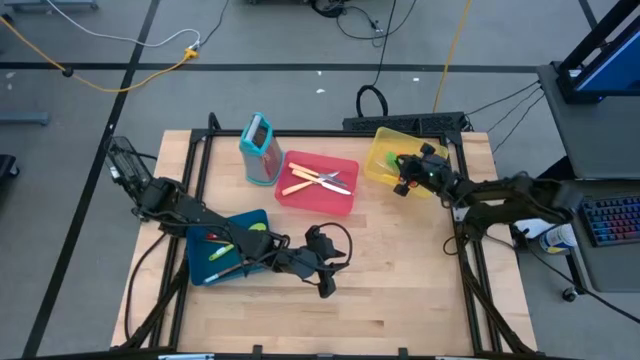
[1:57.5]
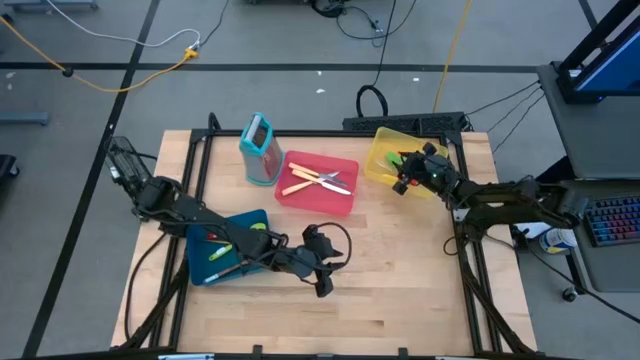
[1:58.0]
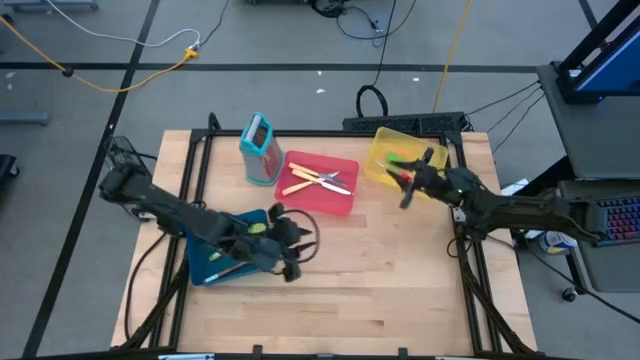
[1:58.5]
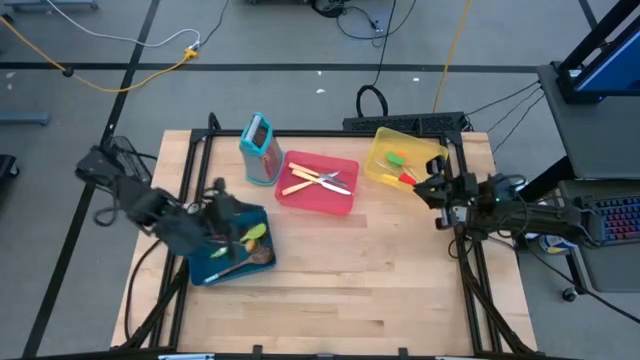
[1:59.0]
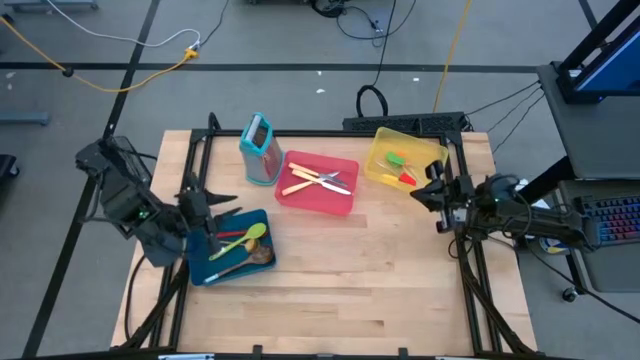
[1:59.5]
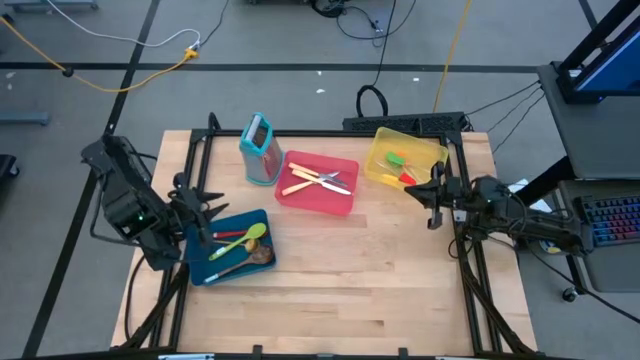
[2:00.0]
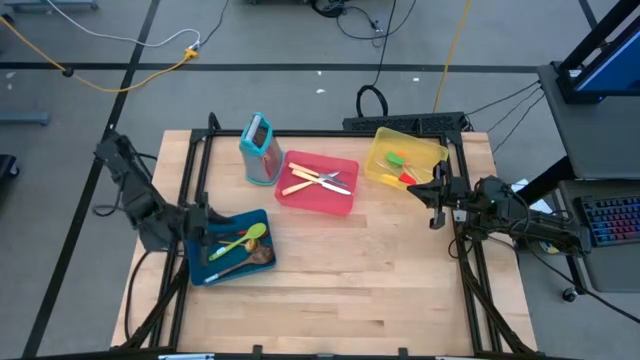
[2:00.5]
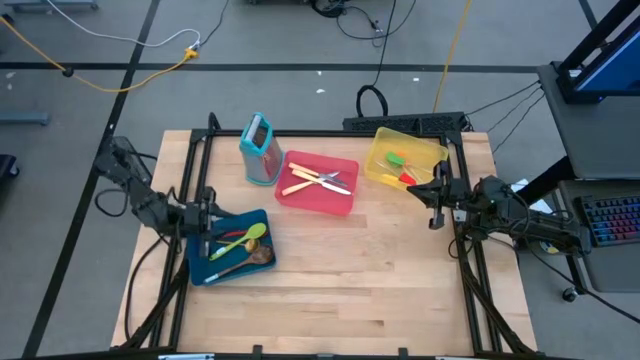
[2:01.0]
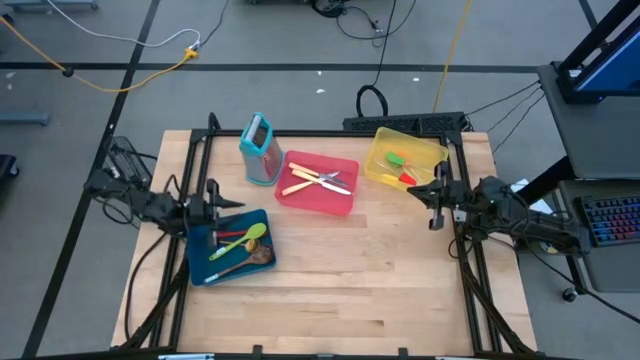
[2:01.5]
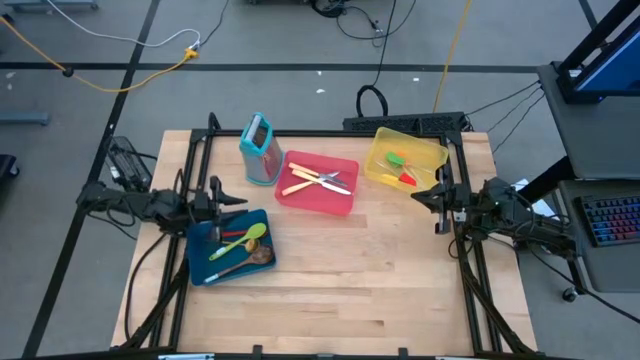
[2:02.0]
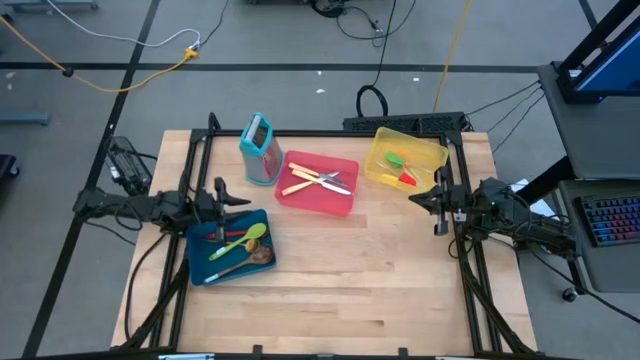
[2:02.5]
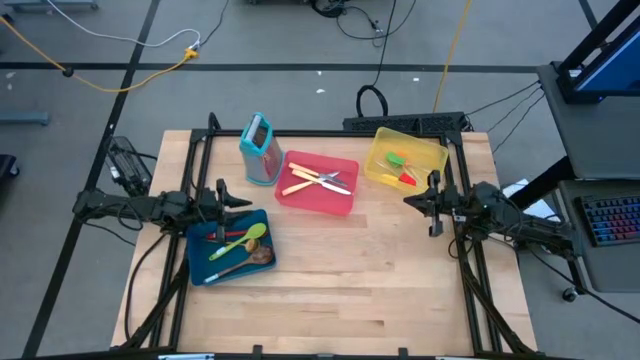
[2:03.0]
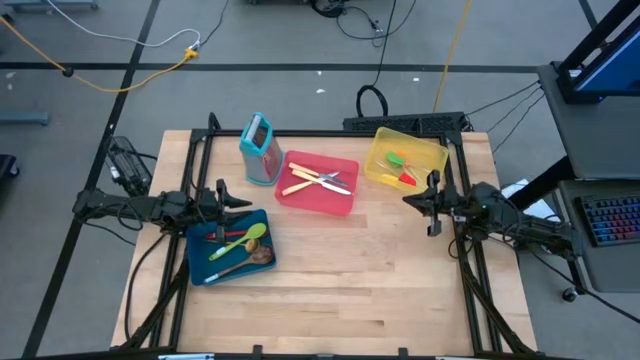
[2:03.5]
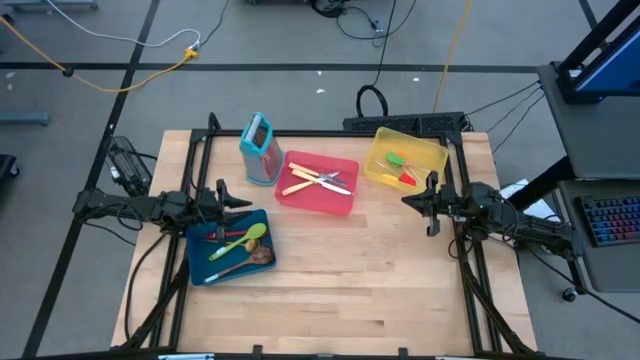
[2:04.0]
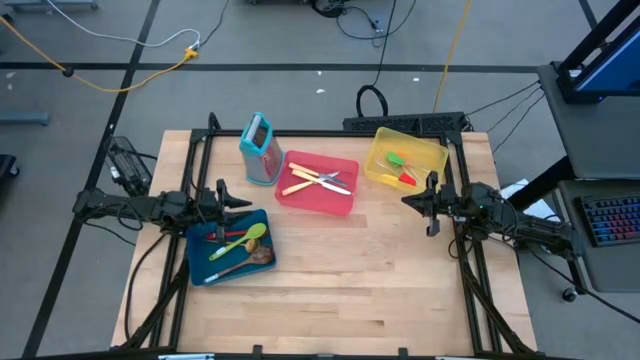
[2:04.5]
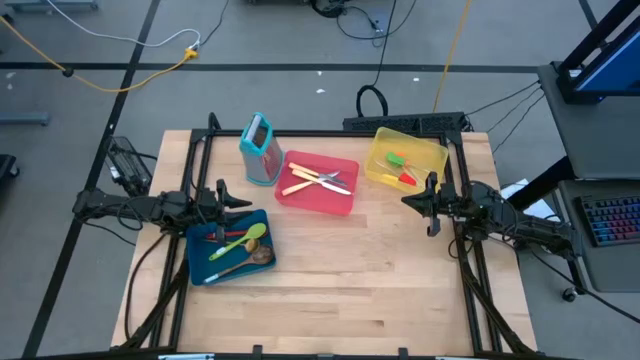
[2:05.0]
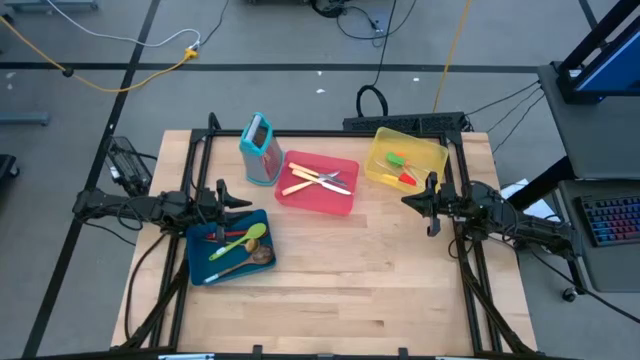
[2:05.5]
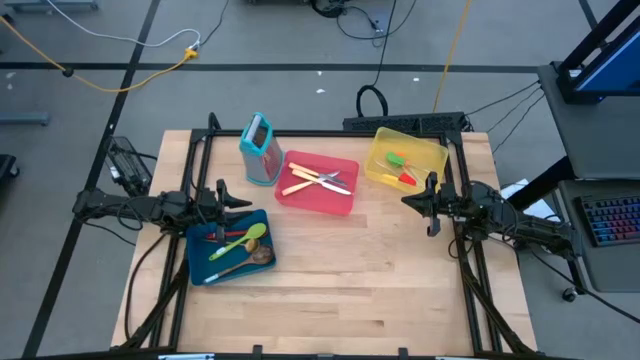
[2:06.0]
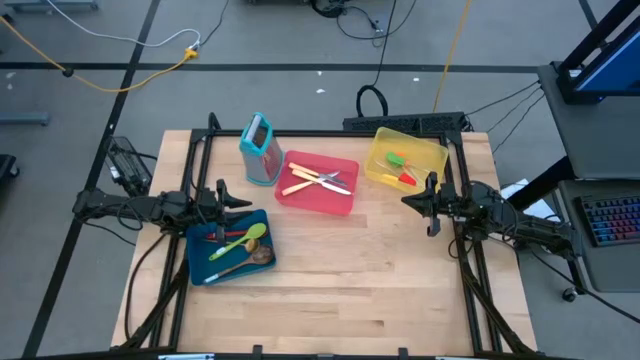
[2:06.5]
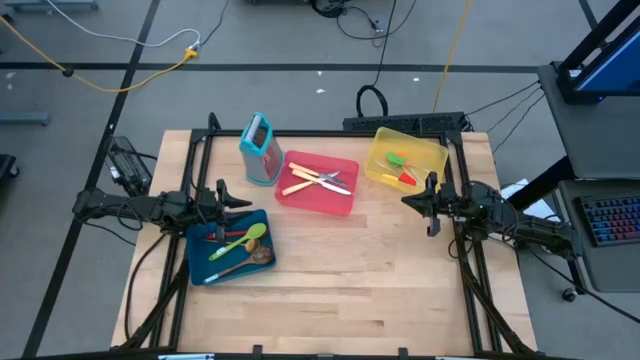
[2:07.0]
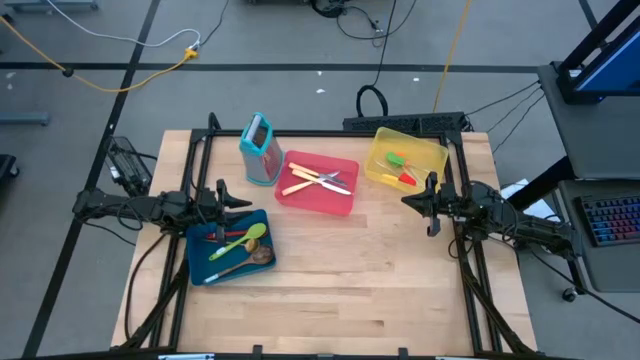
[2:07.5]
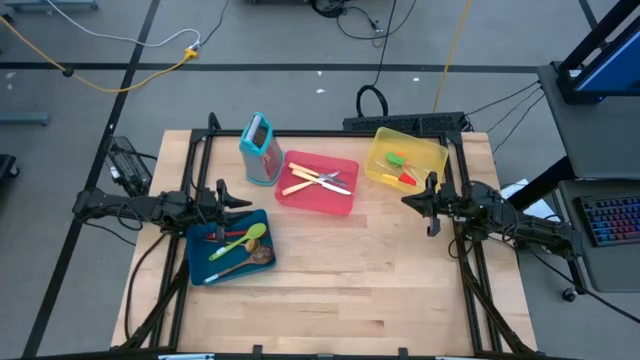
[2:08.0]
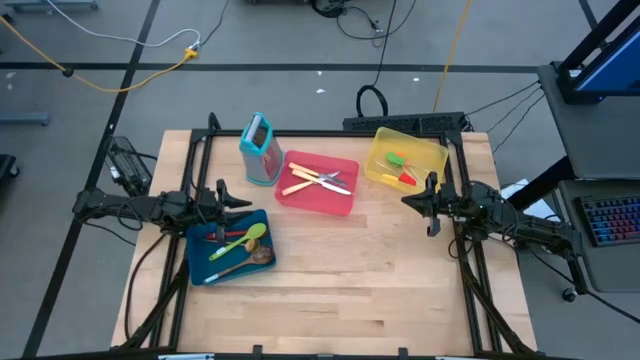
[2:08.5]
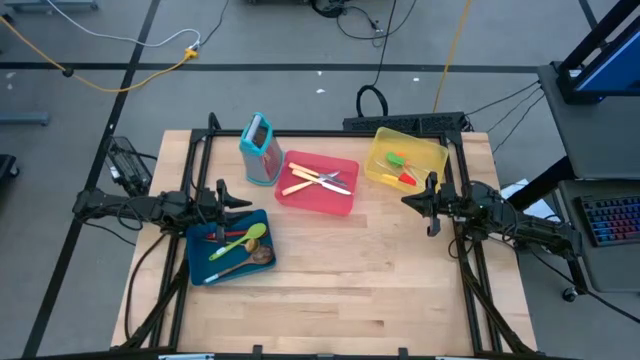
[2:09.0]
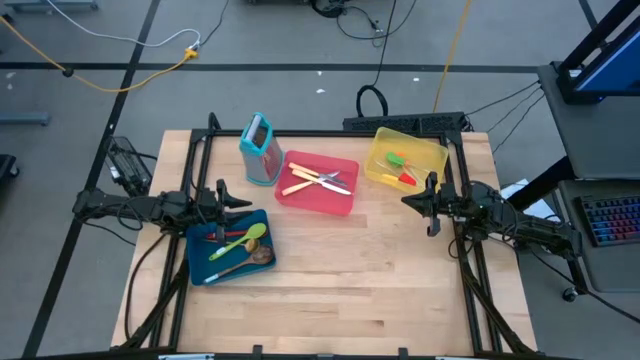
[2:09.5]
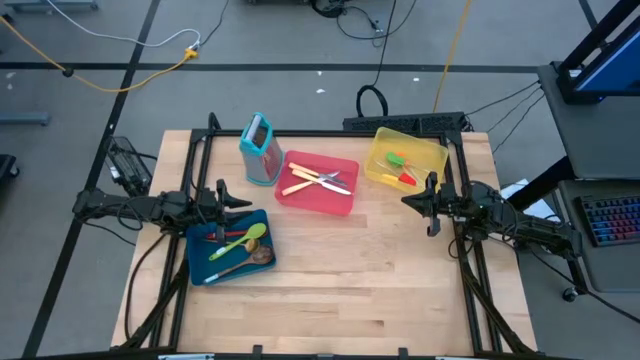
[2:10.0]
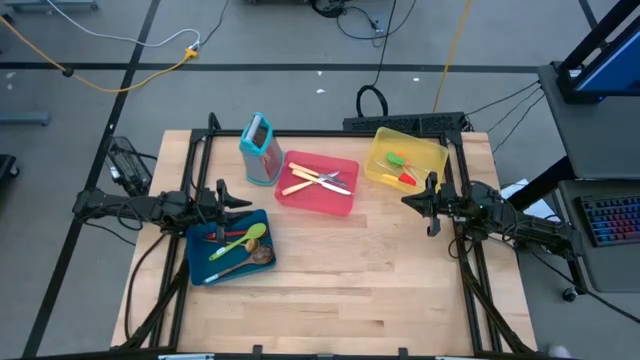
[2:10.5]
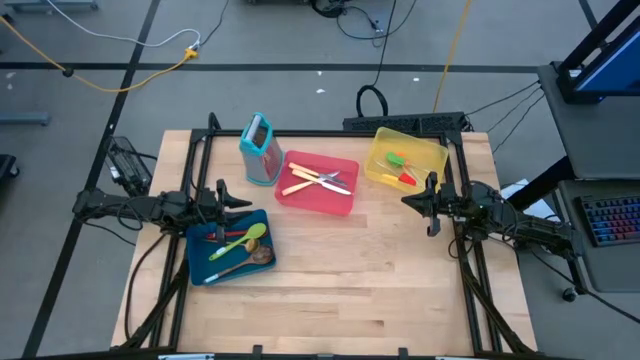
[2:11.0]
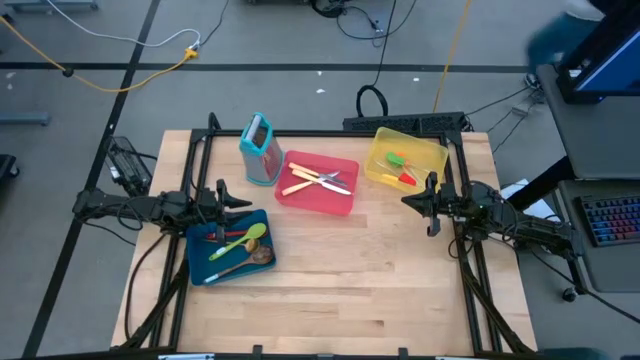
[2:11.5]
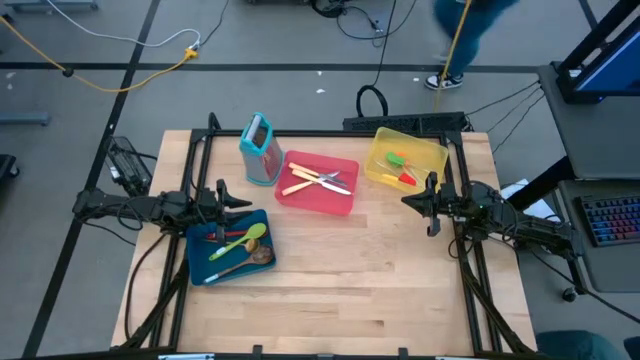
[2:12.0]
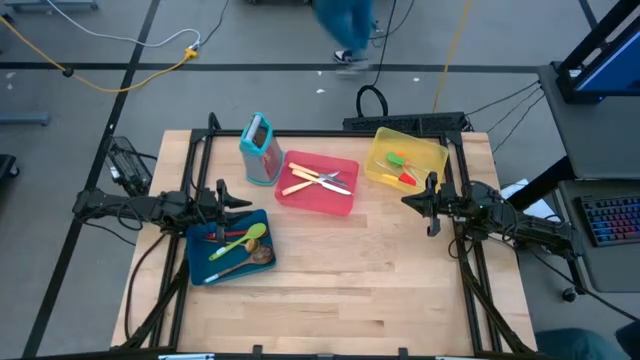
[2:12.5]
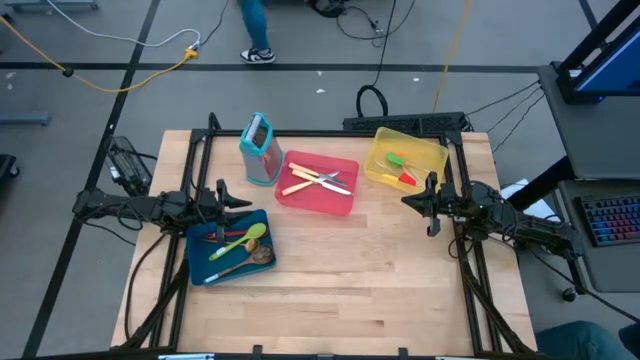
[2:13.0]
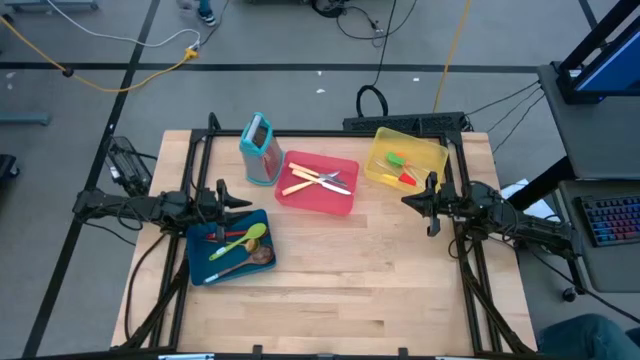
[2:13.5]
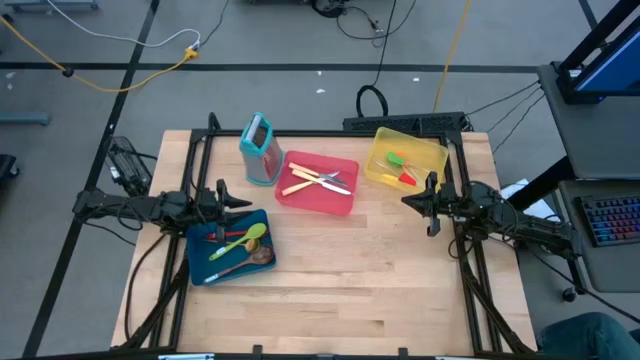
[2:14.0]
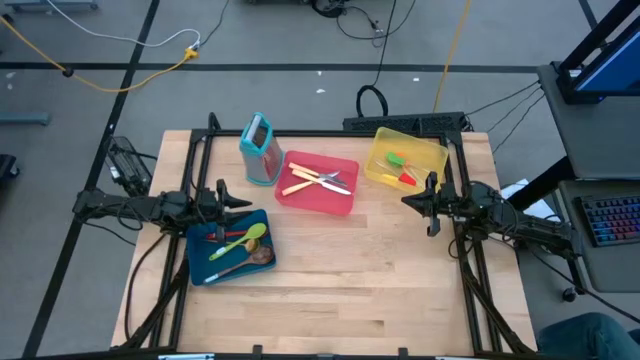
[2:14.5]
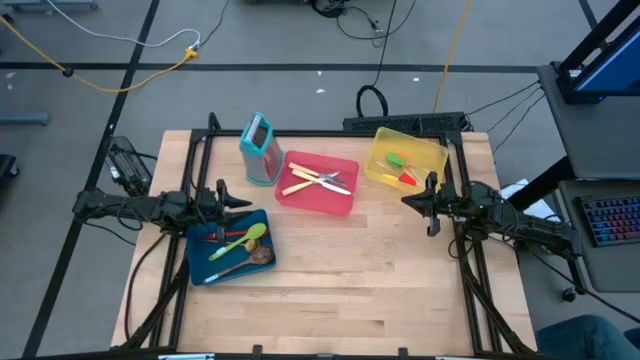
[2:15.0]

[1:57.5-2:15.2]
Task: Pick & Place Kitchen Items
Return to Home Position

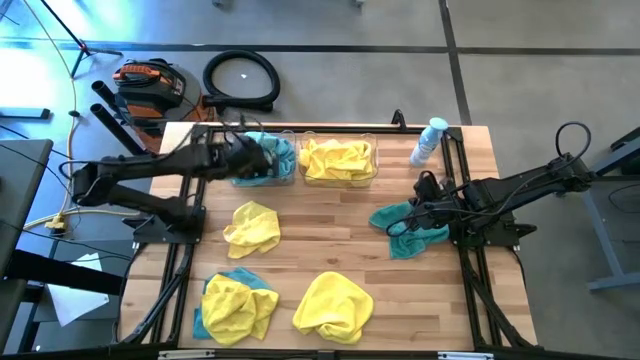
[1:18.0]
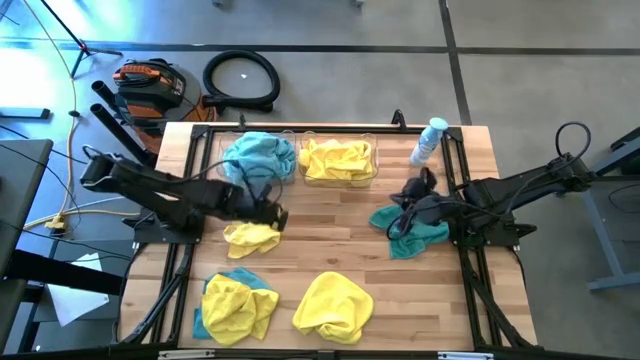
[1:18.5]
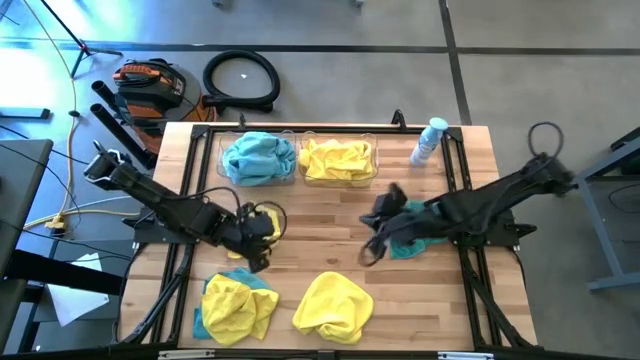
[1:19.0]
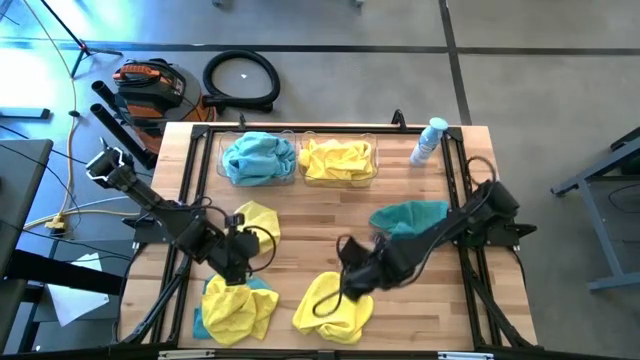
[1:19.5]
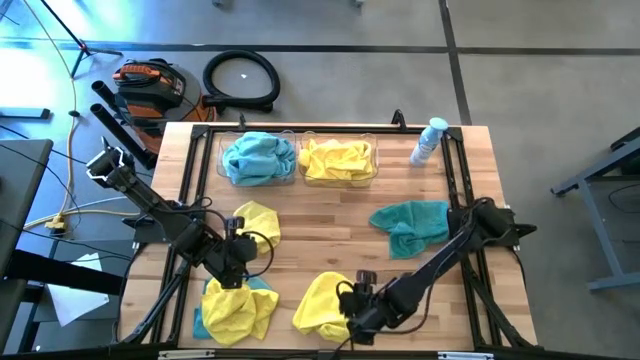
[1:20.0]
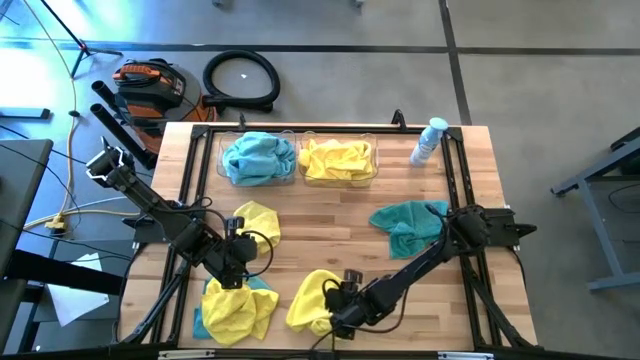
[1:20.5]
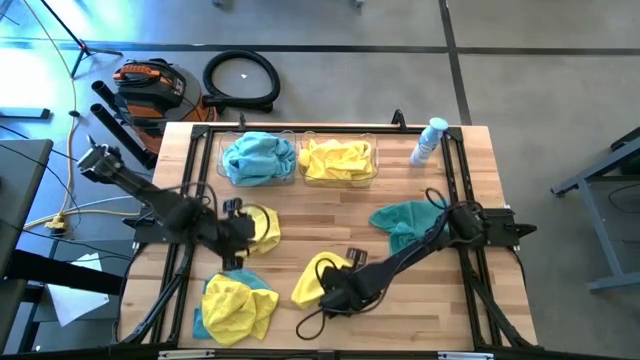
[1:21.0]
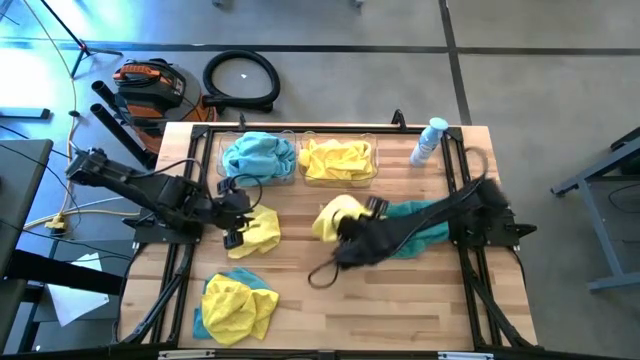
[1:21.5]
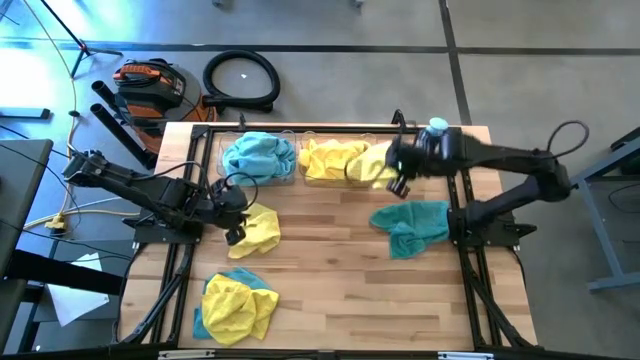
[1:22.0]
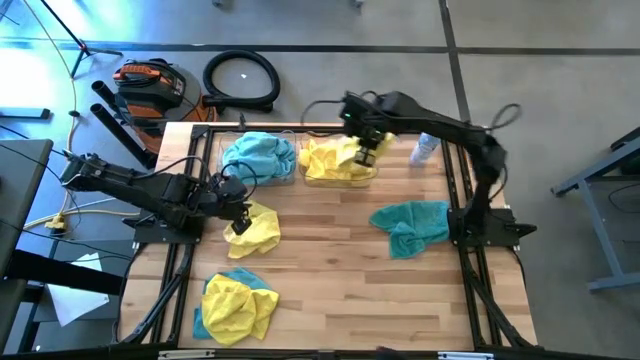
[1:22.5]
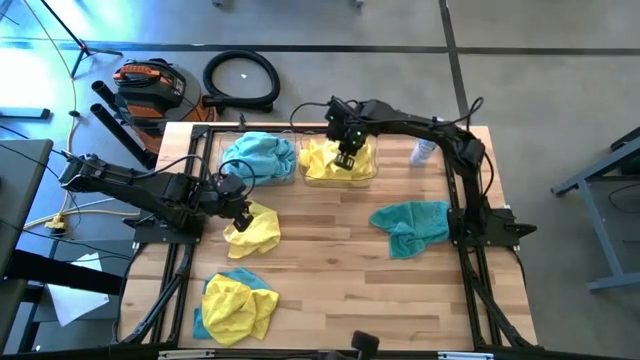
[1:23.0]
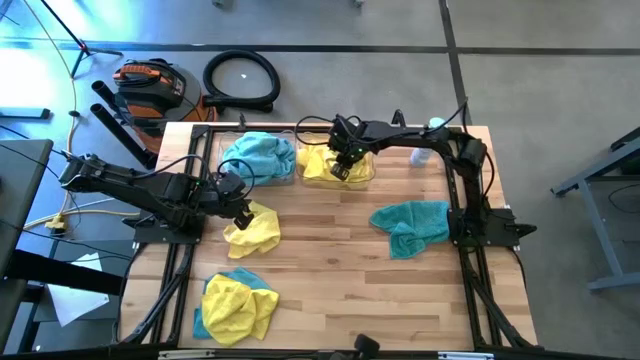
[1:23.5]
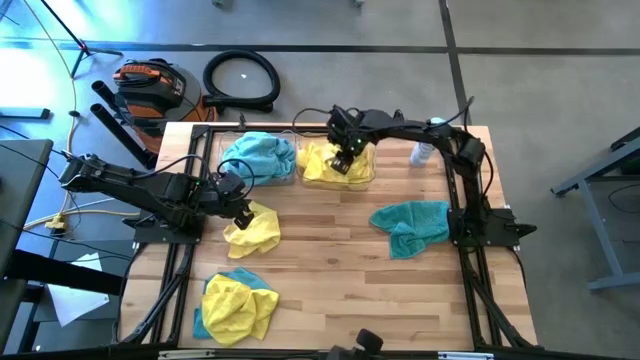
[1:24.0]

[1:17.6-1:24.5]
Task: Sort microfiber towel by color & place in baskets
Put the yellow towel into the right transparent bin
